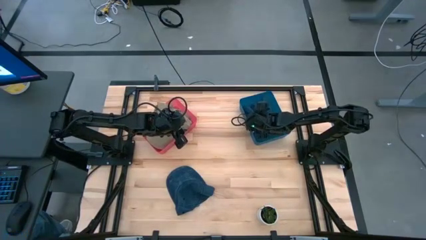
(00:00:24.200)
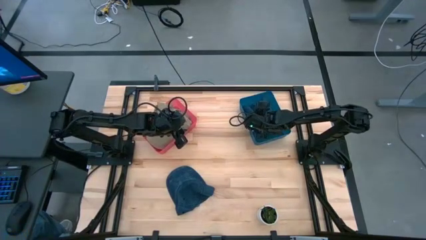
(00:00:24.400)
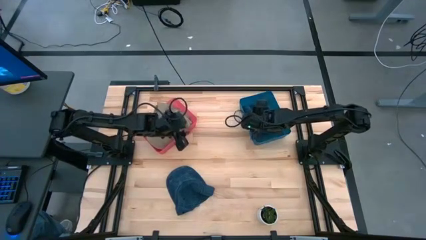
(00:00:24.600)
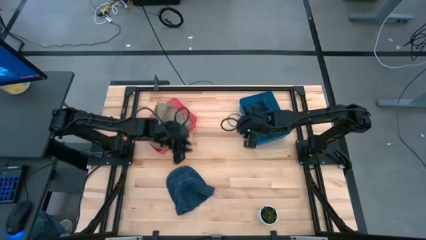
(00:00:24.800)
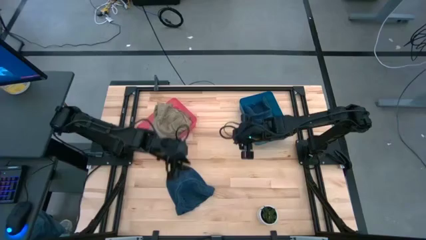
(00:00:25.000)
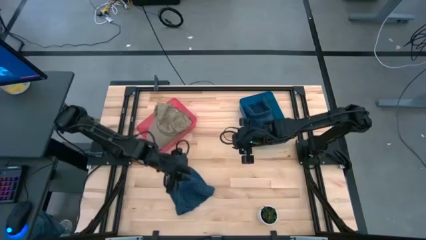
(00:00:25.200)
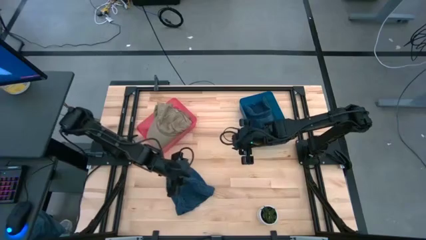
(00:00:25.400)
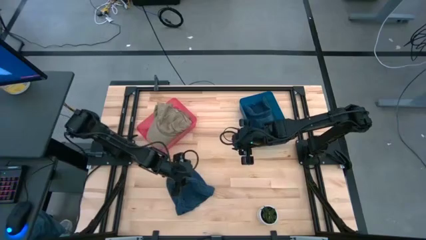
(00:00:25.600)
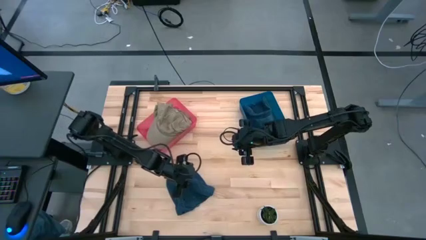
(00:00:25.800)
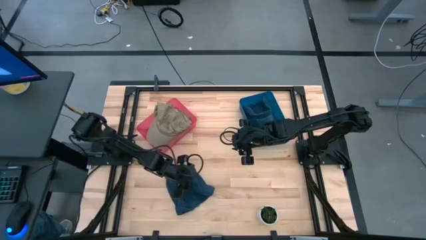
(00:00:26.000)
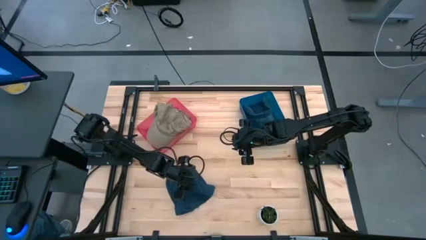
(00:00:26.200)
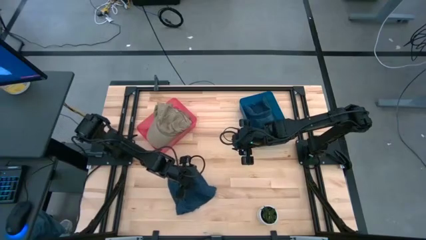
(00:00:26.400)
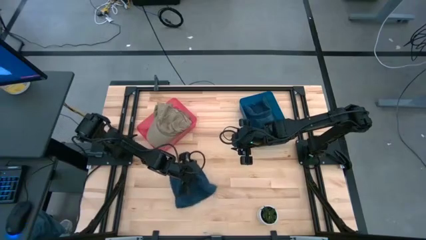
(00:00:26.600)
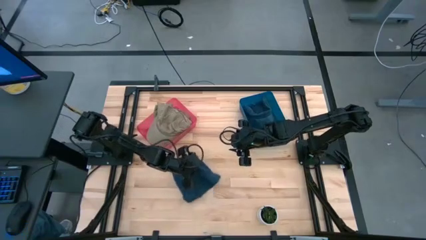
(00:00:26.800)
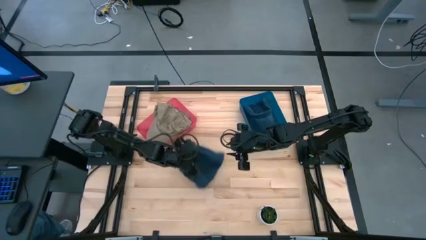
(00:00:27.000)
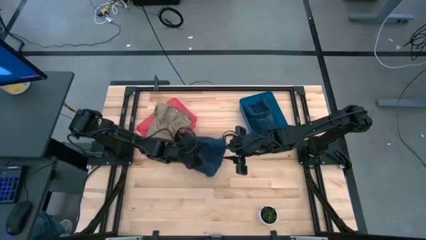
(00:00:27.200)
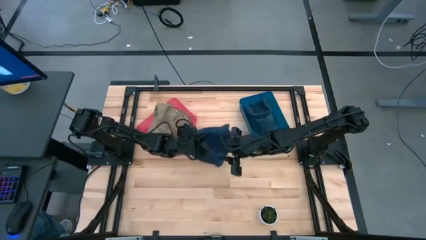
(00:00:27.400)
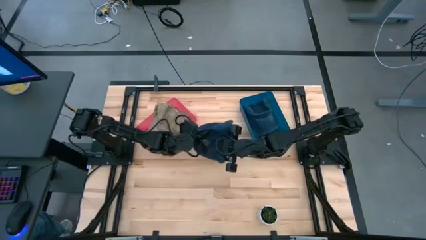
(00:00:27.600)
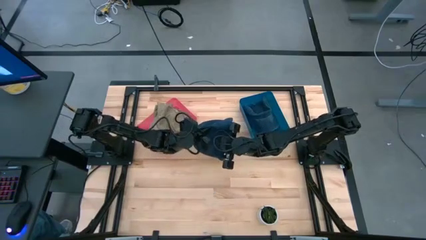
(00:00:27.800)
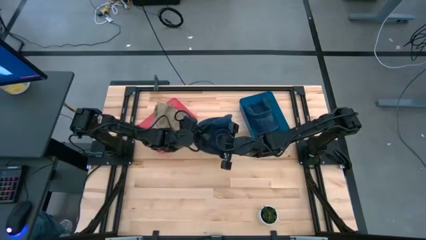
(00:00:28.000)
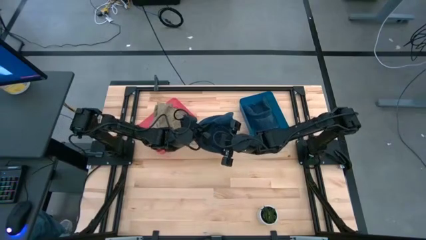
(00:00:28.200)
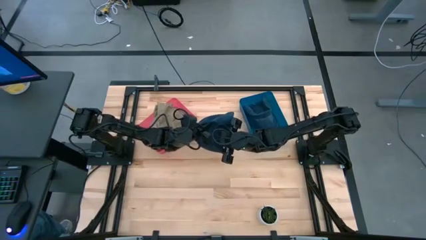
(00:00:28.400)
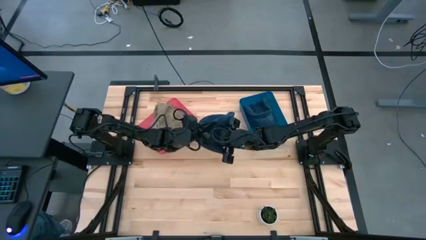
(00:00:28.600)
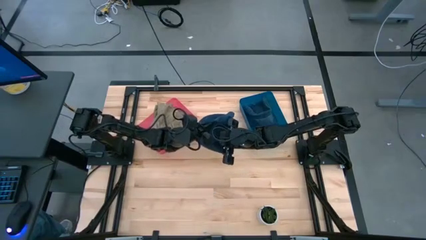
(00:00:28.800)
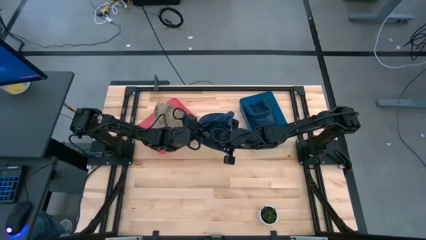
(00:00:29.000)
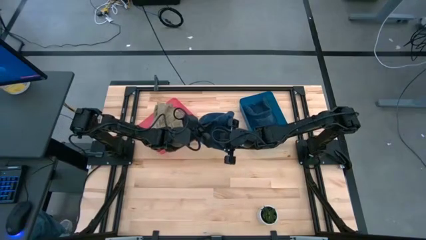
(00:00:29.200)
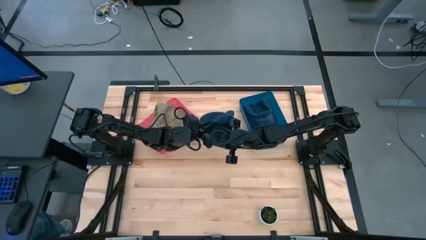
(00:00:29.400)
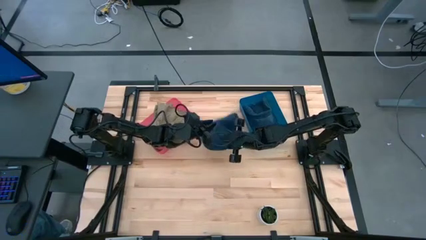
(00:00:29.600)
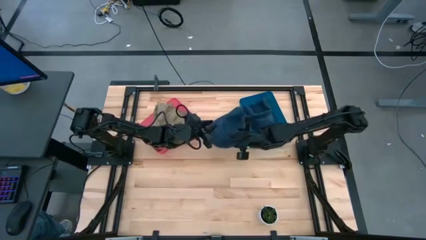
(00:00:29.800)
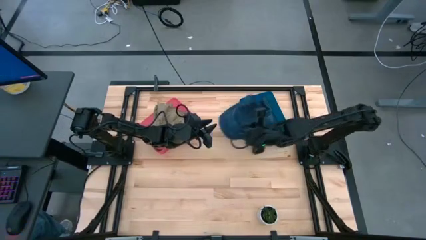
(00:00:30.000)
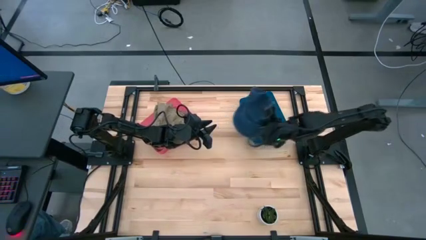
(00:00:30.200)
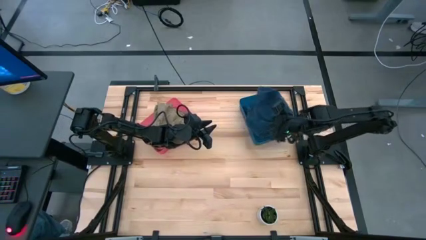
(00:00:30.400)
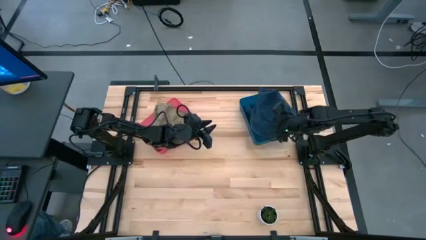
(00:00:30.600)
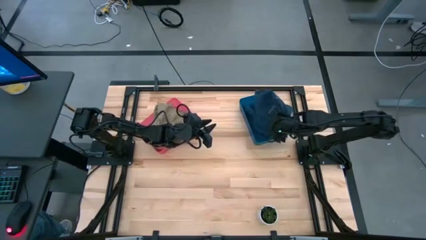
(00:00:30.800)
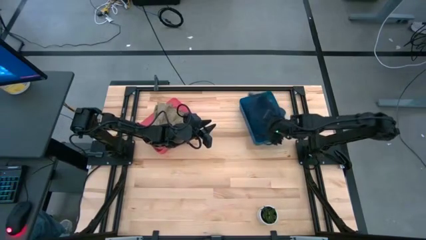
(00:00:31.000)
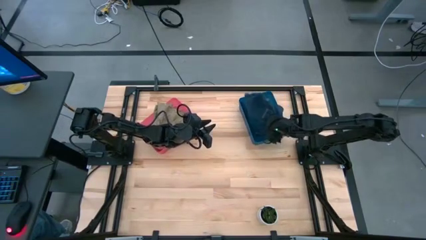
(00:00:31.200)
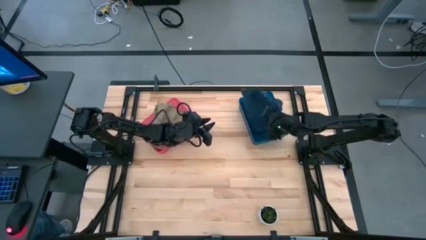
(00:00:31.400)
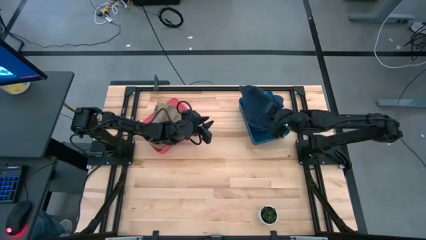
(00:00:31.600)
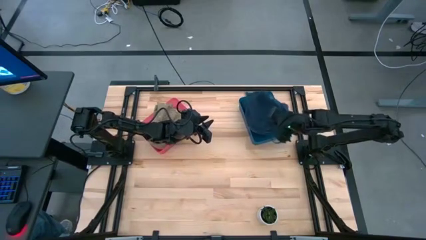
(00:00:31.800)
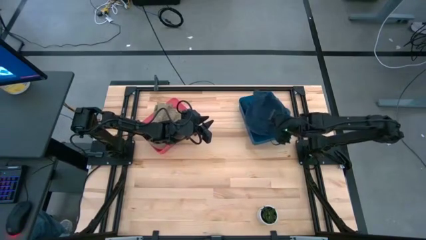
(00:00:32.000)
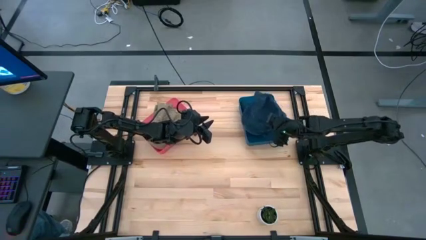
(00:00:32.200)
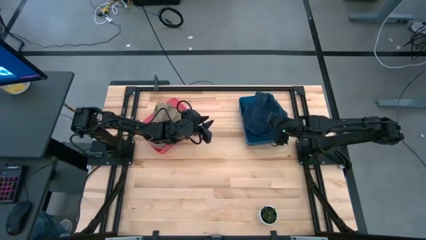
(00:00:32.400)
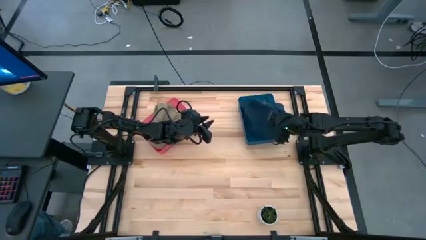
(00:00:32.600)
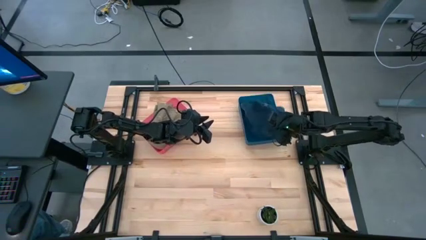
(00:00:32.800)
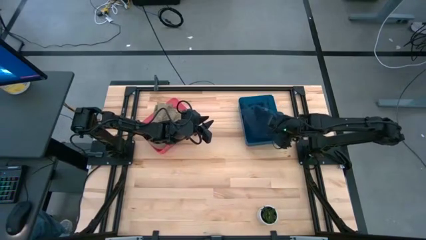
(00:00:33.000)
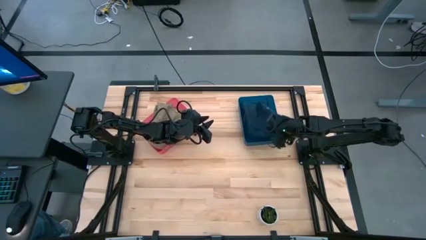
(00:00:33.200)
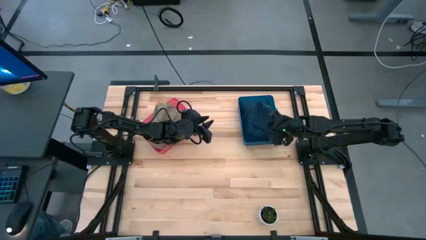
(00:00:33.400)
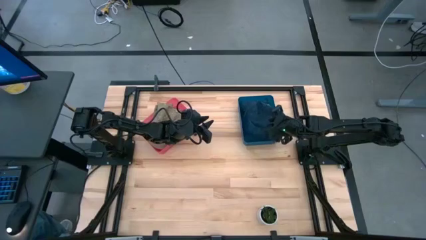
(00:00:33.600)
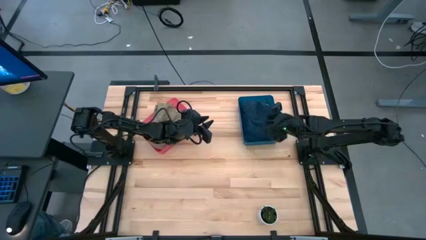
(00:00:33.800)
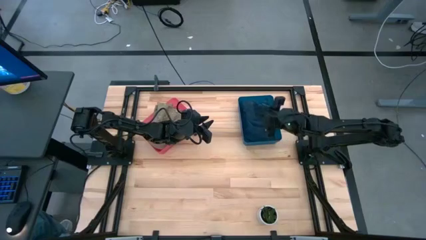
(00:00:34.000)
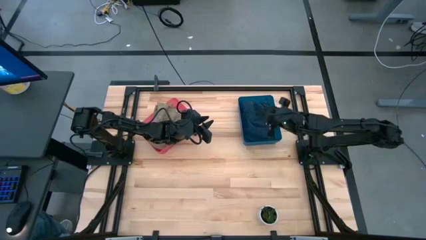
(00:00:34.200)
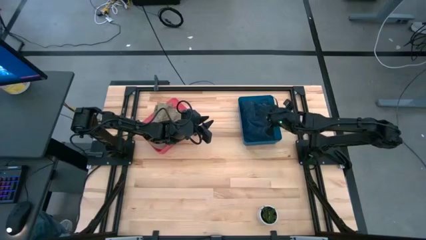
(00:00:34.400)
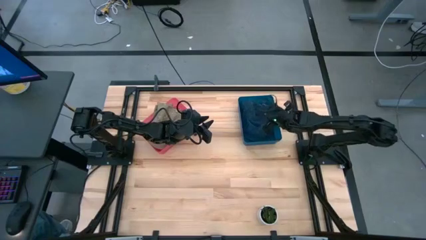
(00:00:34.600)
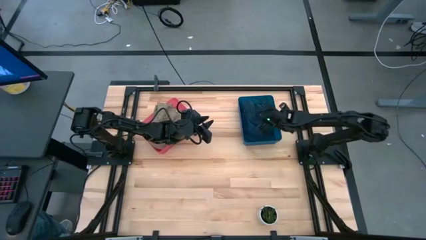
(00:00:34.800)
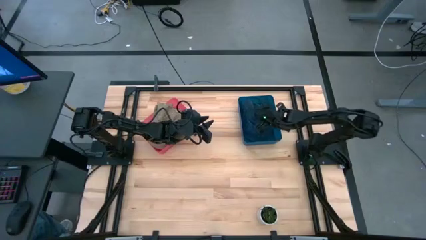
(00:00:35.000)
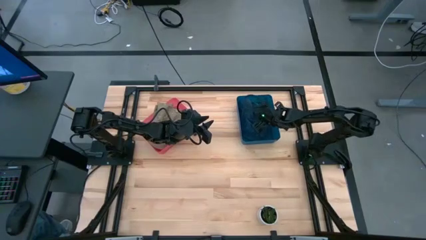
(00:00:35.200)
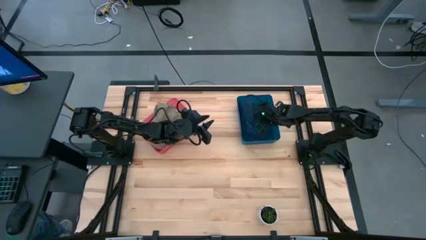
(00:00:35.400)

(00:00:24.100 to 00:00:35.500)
Task: Pick & Place hat
Put the blue cap into the blue bin

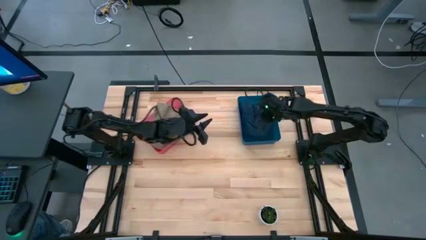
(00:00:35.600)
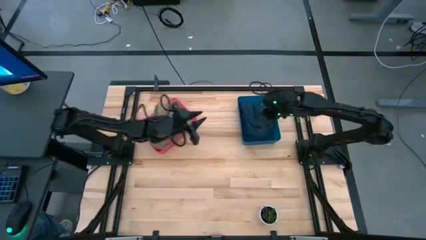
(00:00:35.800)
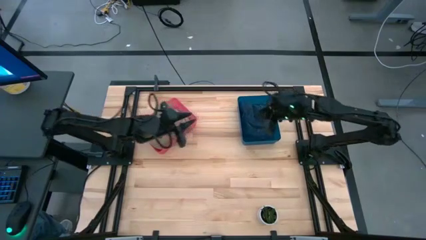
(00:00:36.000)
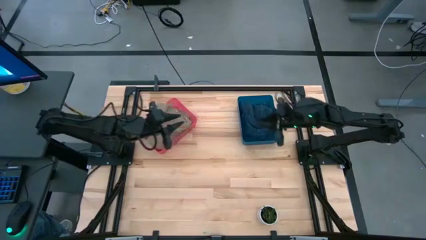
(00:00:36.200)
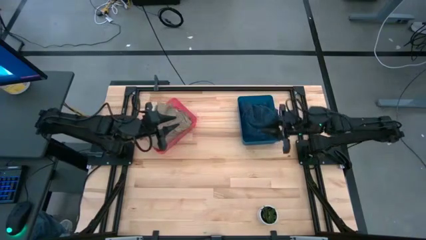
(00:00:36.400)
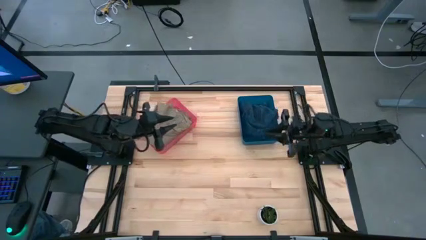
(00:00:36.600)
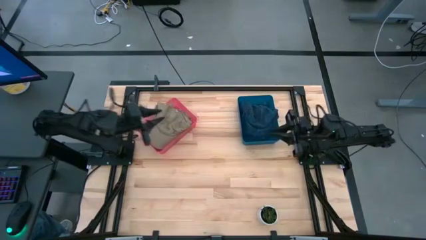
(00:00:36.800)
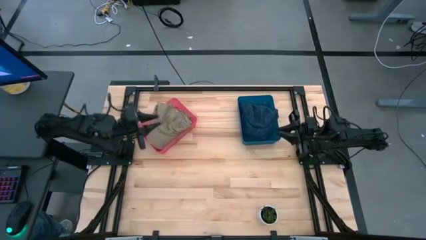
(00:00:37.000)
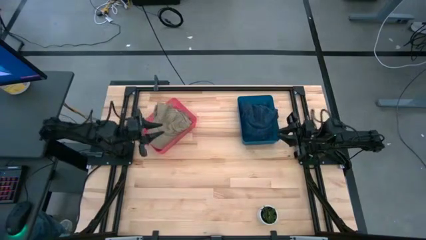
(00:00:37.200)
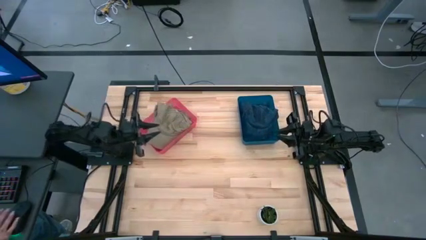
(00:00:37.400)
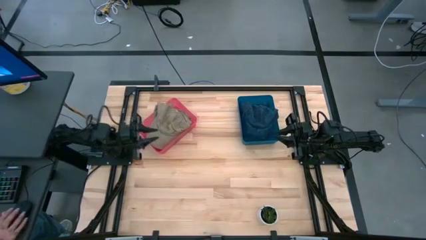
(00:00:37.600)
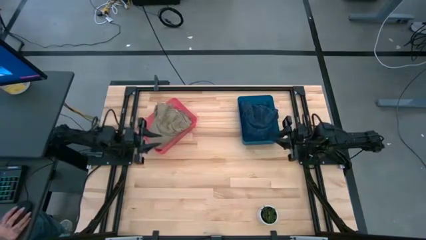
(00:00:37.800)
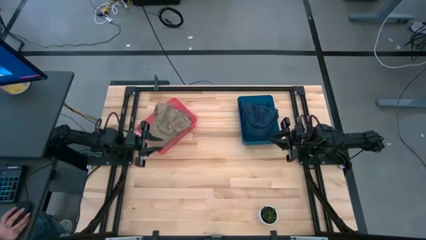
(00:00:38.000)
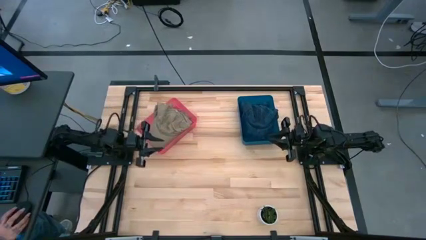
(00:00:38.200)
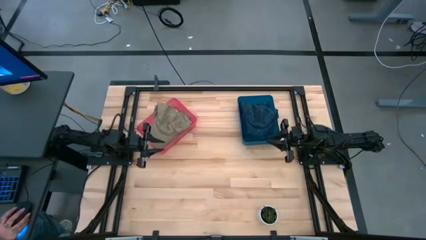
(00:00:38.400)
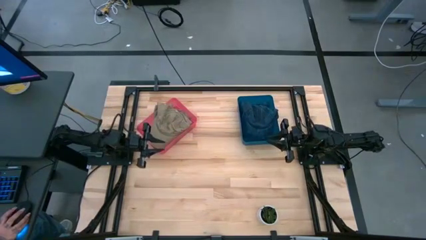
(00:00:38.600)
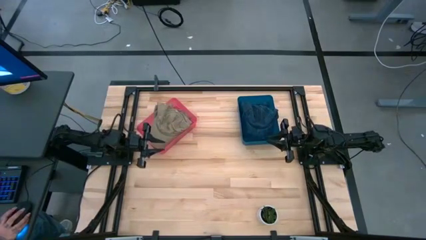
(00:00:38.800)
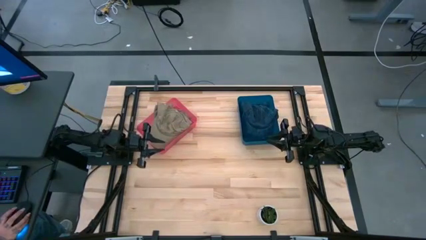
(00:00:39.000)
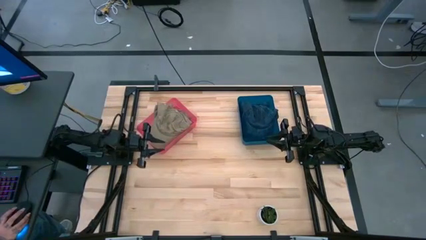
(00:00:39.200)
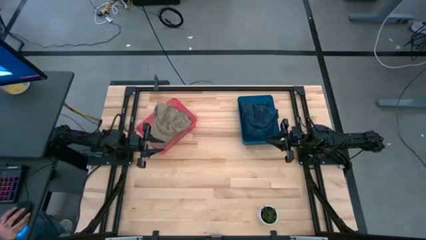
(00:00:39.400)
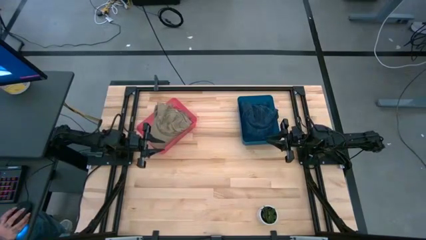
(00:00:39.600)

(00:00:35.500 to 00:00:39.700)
Return to Home Position

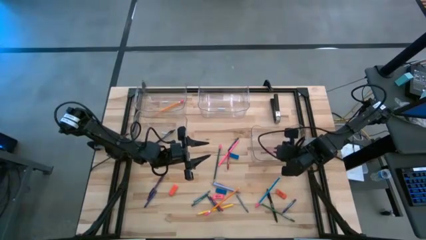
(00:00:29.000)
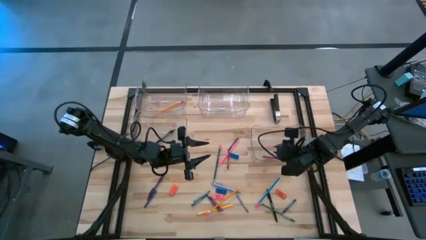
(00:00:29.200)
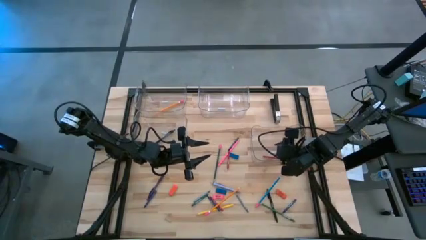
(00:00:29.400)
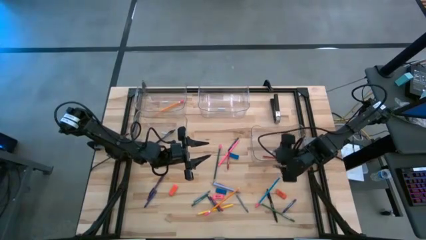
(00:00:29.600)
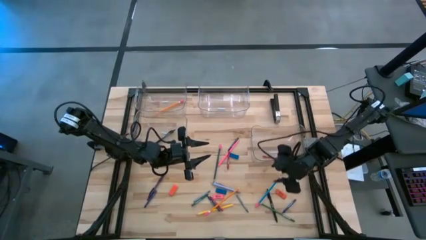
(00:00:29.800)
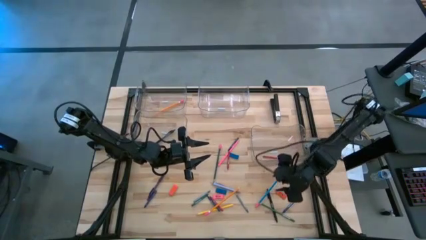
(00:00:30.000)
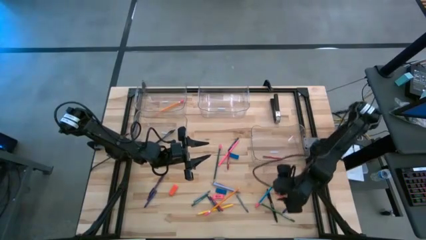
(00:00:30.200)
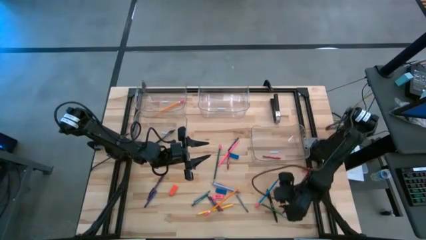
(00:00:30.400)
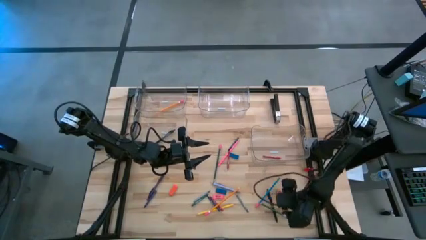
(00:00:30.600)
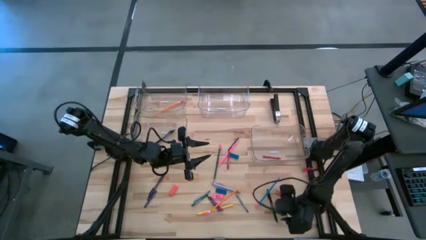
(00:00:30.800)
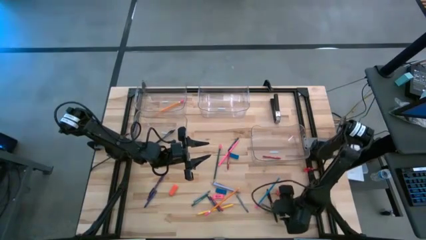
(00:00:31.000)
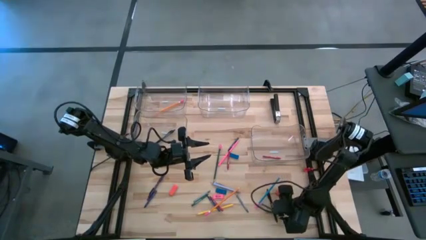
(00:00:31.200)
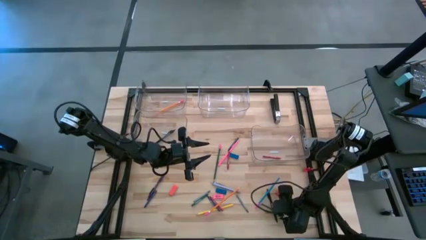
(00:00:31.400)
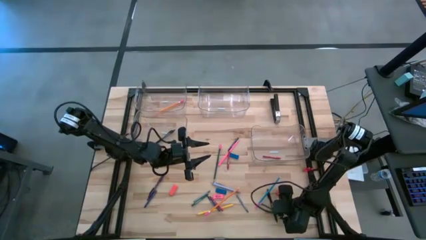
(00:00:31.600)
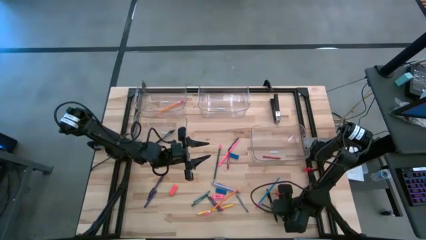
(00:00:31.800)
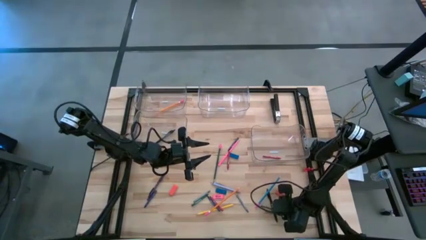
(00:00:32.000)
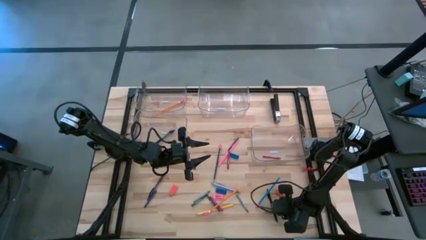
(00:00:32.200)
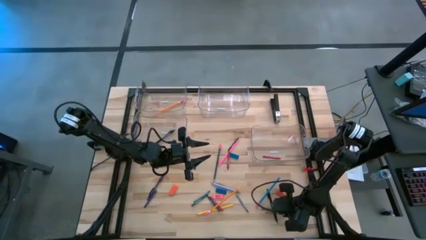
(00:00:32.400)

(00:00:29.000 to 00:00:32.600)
Task: Sort crayons/erasers/pens/pencils in bins
Put the green pencil into the top left transparent bin
